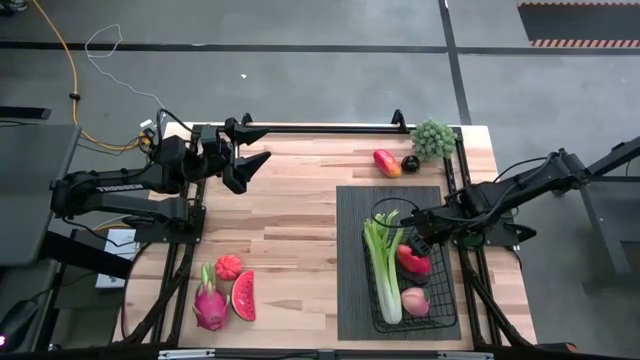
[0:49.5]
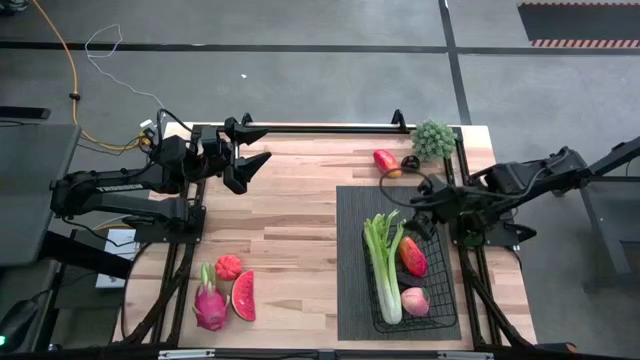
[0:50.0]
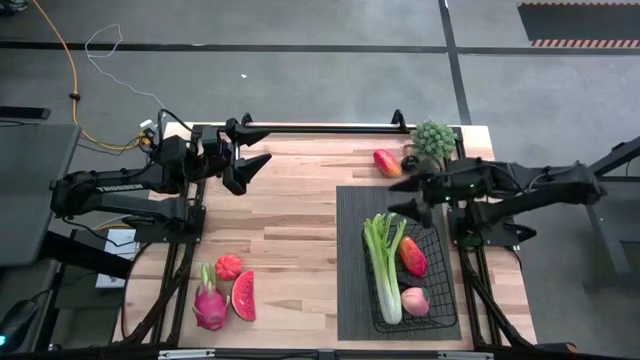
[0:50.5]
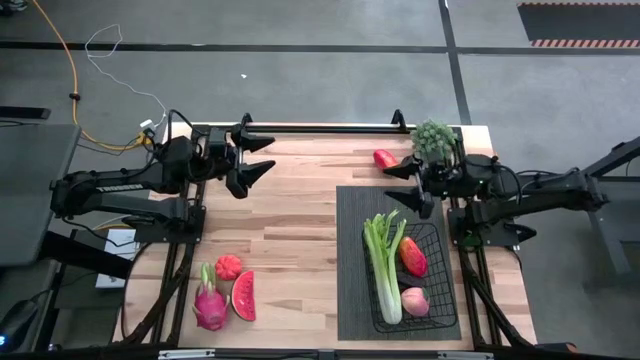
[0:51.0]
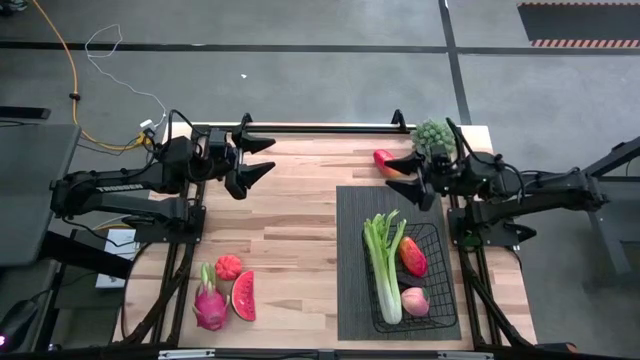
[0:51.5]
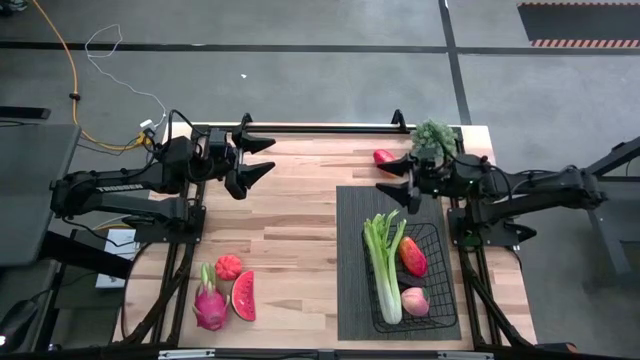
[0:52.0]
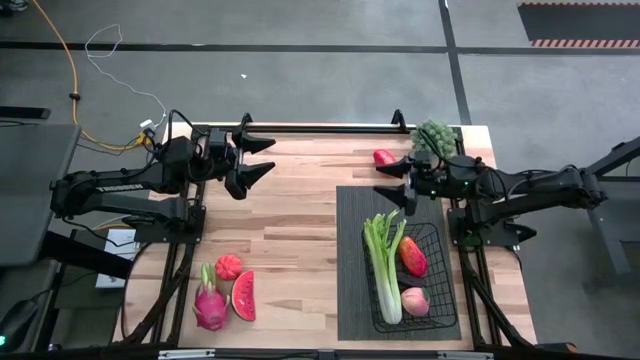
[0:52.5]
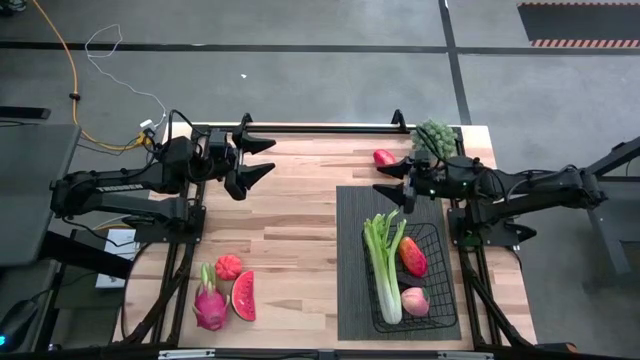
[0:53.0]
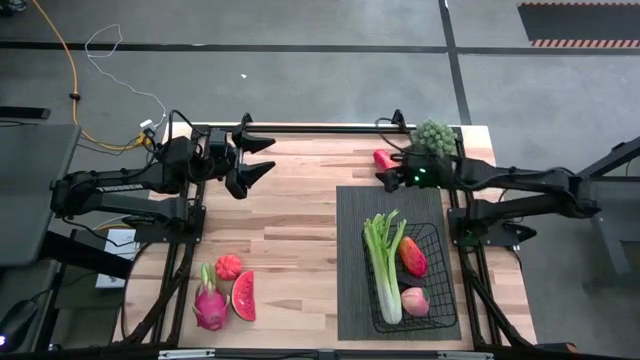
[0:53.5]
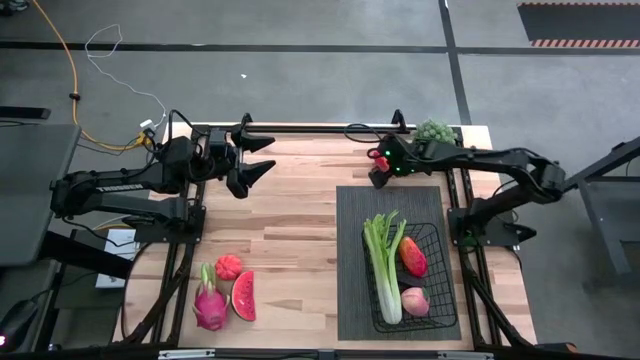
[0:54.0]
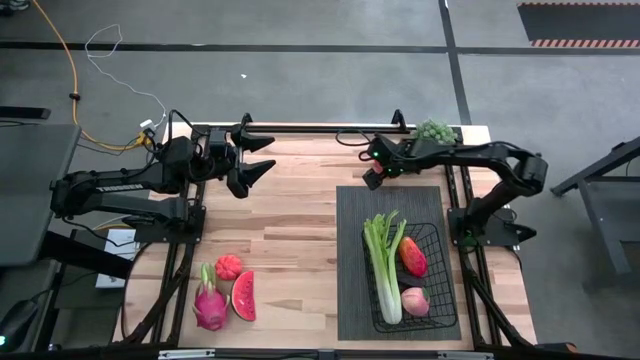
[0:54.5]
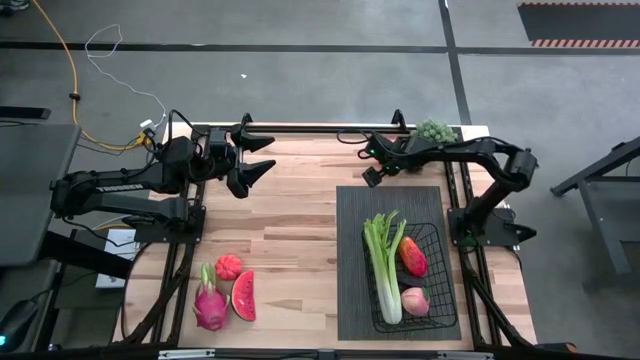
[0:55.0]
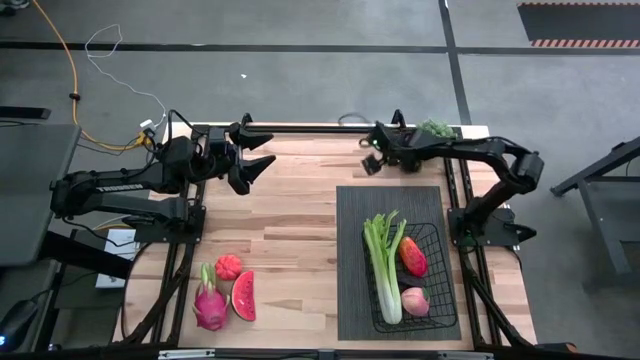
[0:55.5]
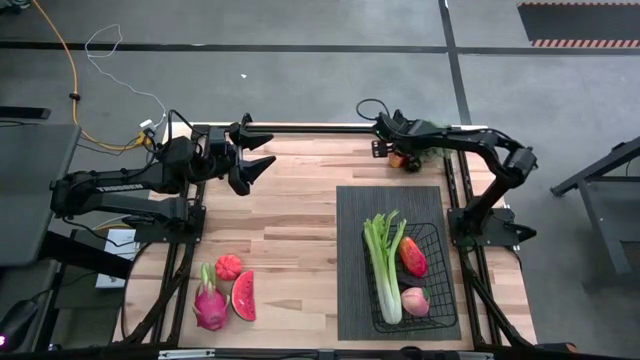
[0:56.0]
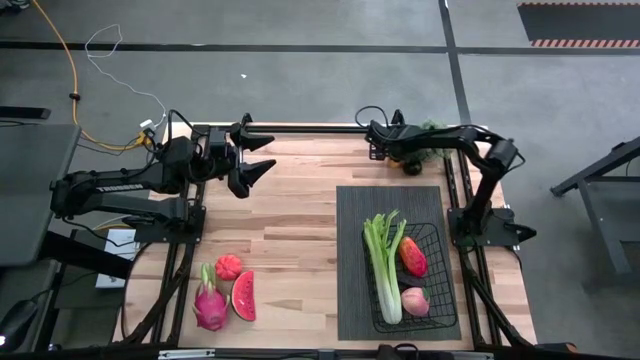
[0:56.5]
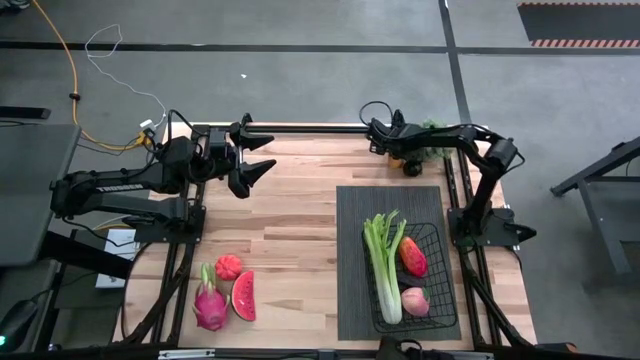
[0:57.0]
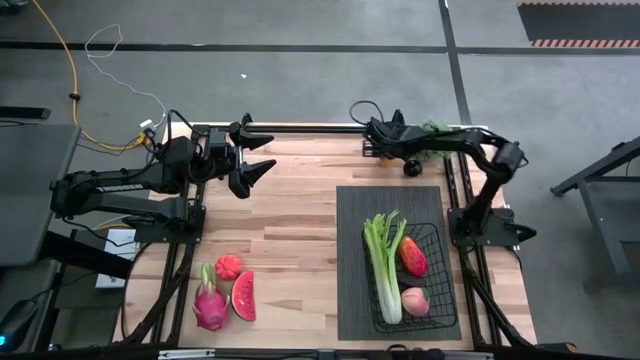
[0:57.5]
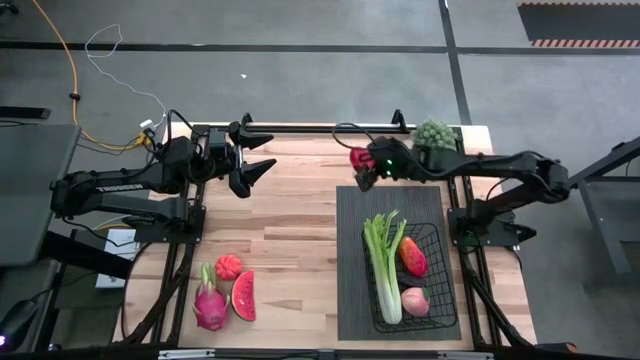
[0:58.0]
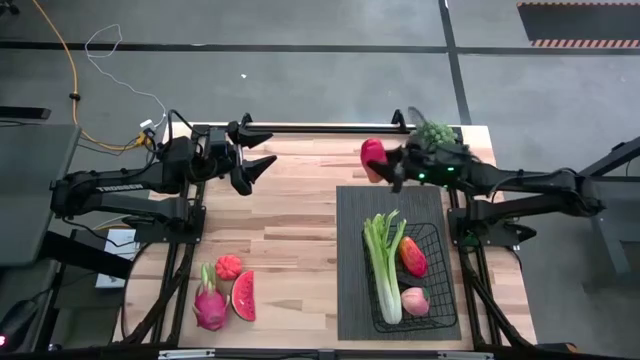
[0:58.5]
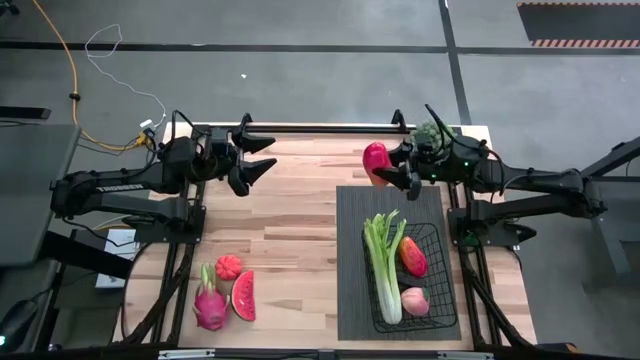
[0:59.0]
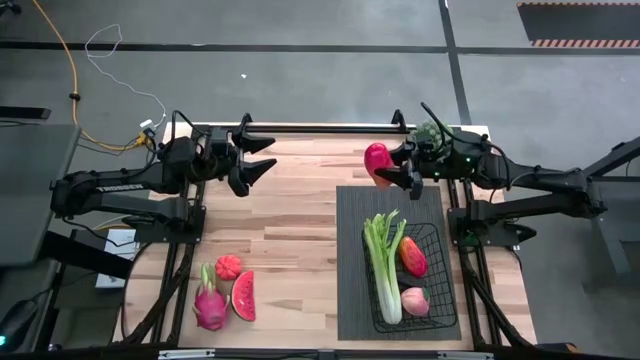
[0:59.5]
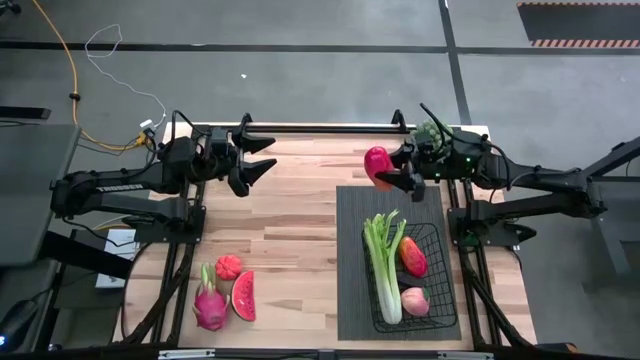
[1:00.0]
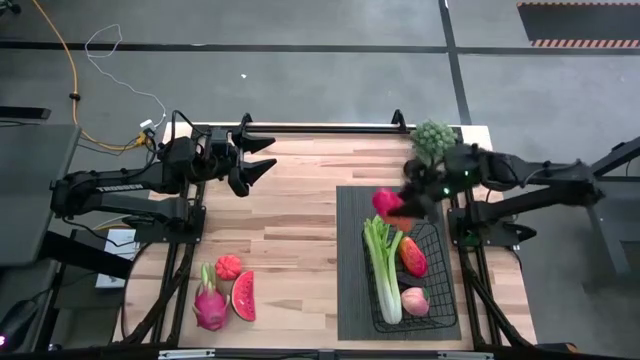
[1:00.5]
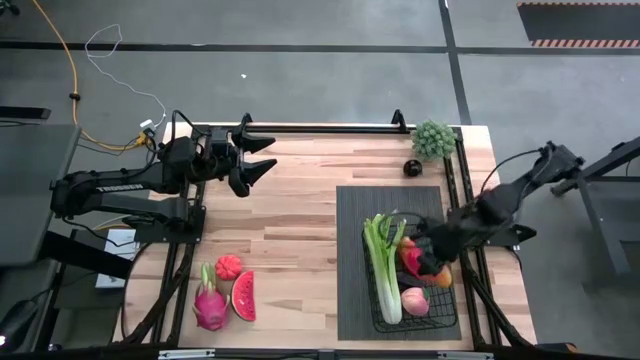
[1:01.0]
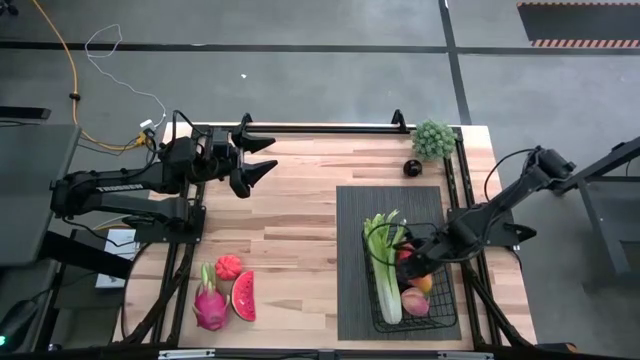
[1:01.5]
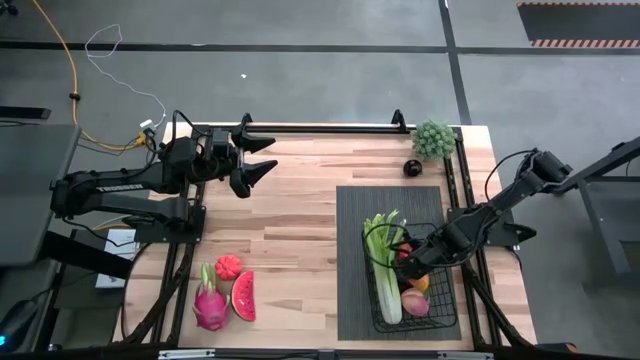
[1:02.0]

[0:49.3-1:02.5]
Task: Build produce basket
Put the mango into the black wire basket

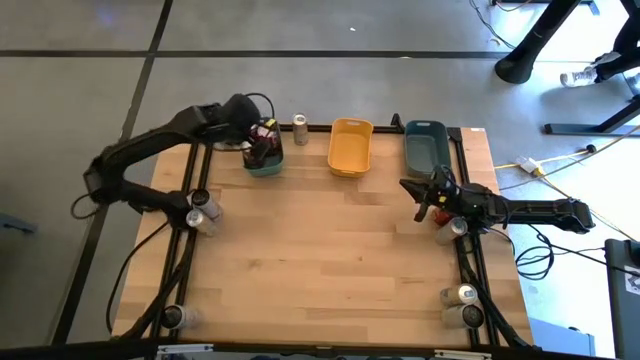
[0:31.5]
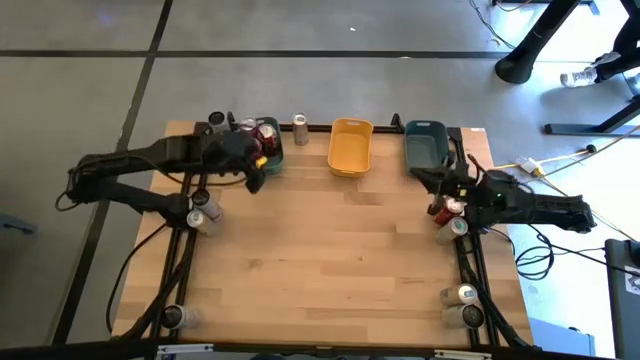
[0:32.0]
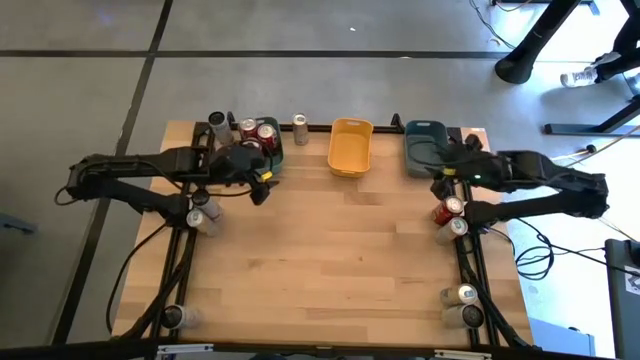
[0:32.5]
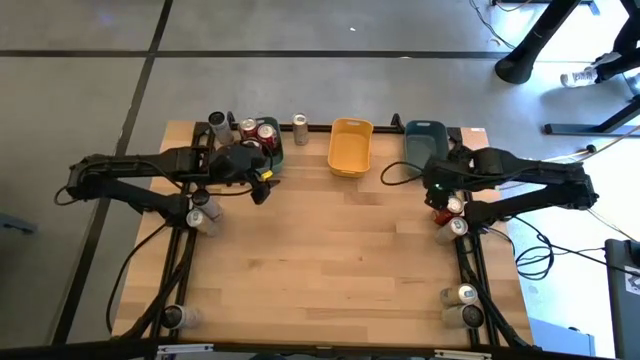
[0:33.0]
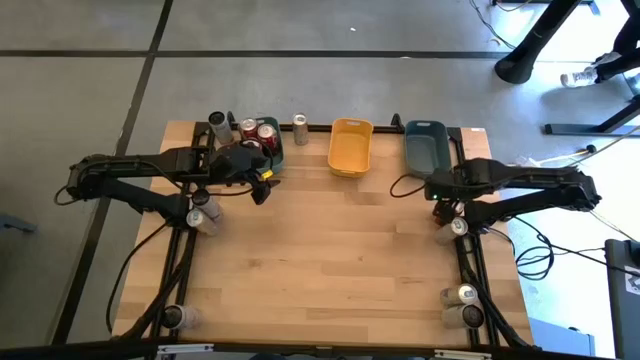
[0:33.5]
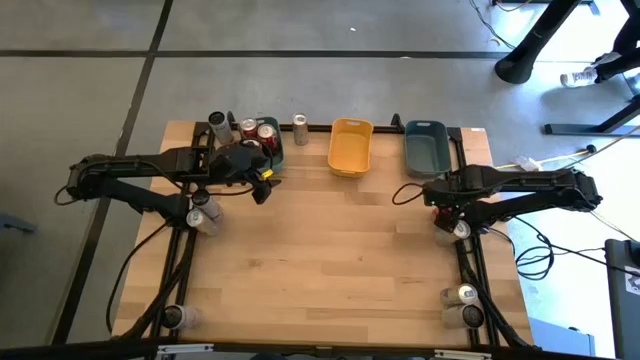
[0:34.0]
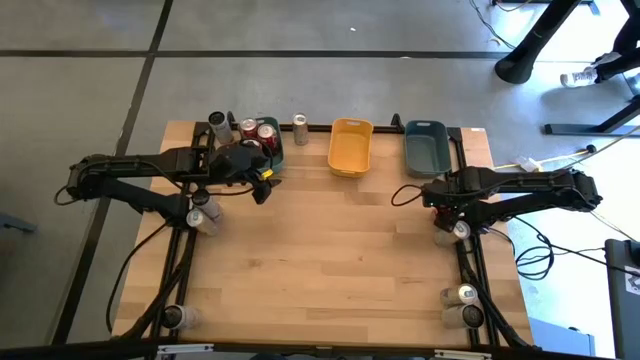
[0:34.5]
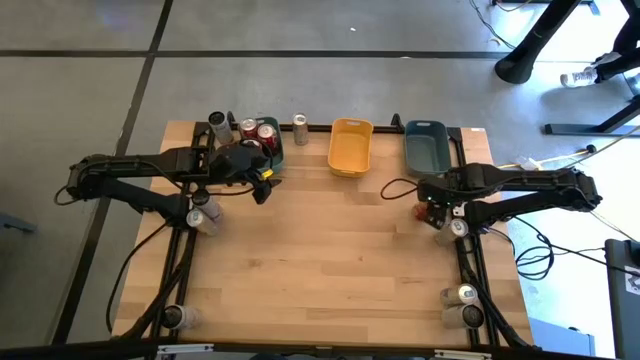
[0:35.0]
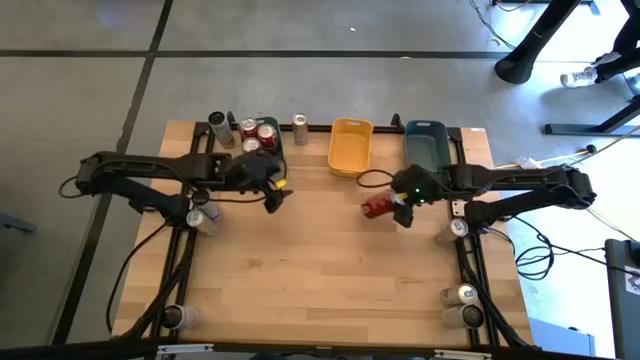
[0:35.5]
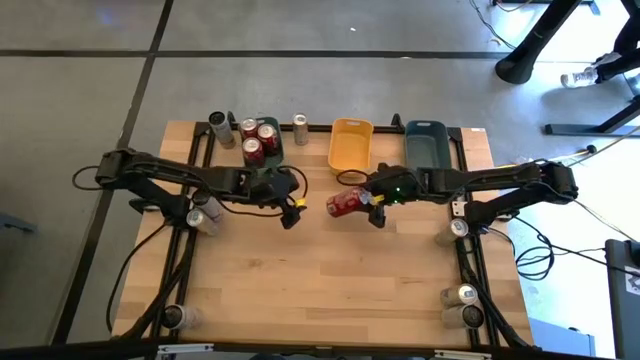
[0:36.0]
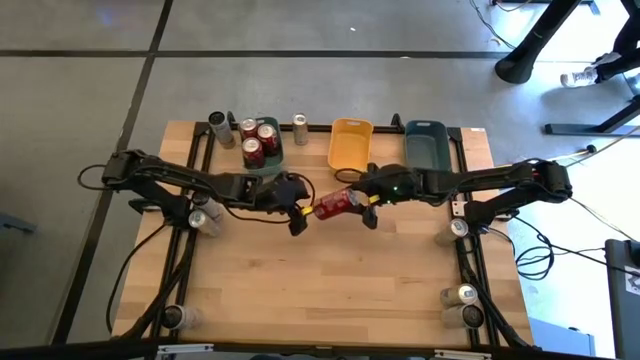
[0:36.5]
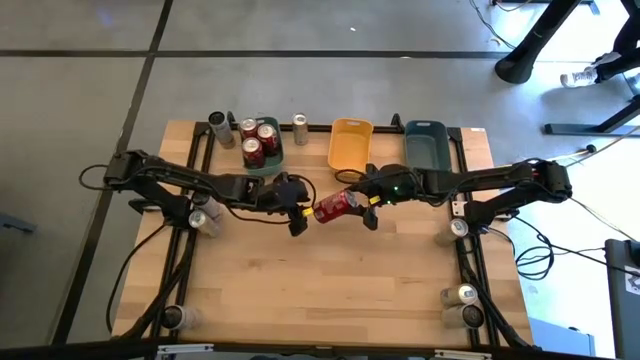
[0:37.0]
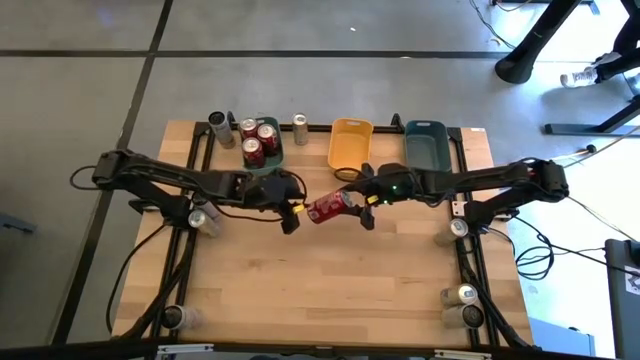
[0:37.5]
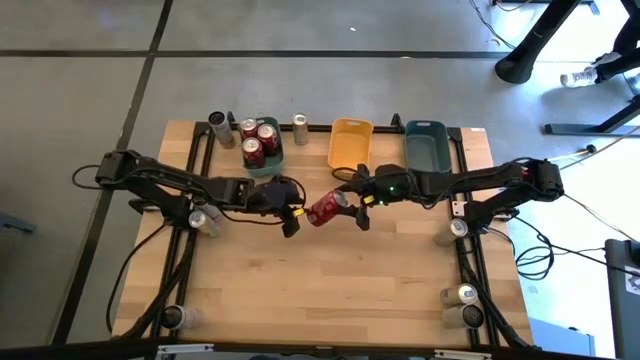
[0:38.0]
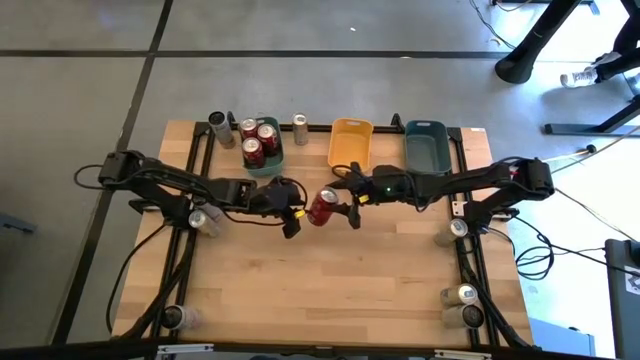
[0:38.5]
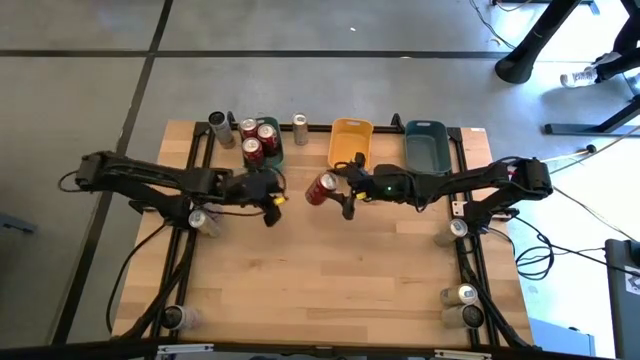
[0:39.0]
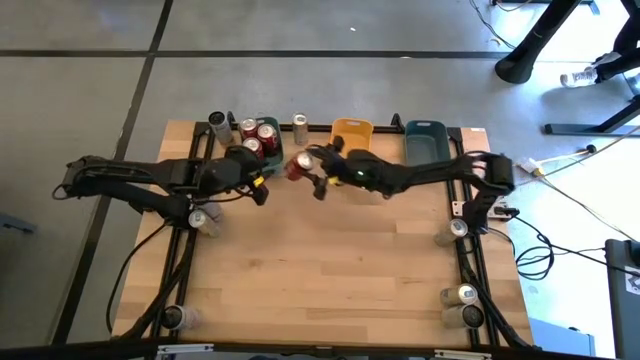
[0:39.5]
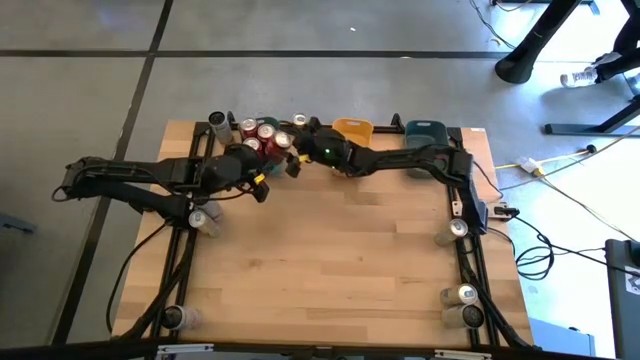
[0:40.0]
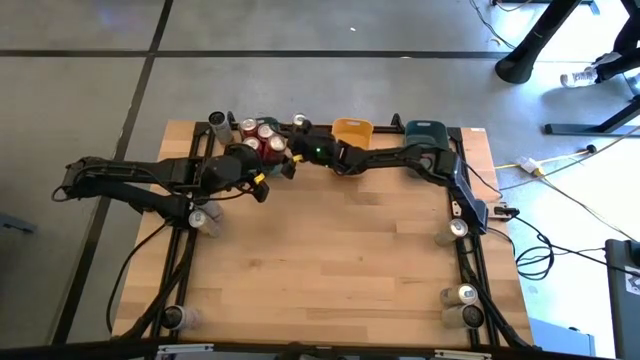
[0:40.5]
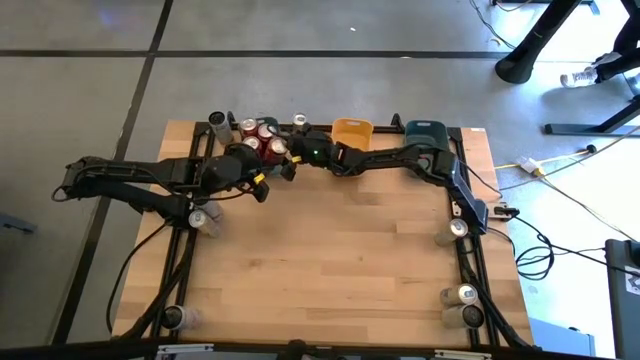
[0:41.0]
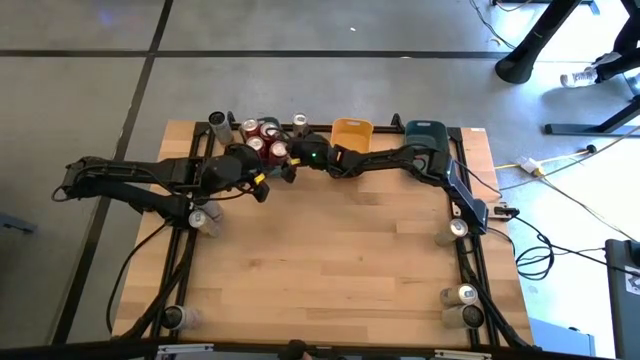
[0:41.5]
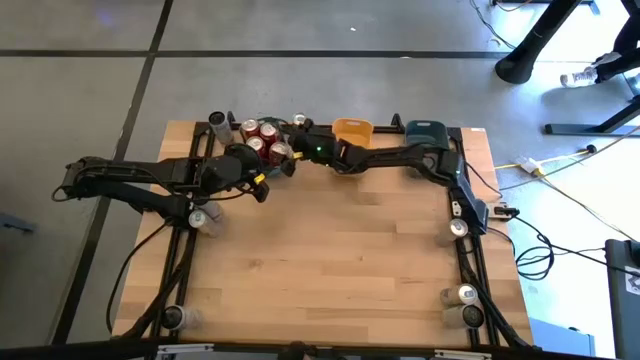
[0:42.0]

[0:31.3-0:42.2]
Task: Sort soda cans
Put the red soda can into the green bin
